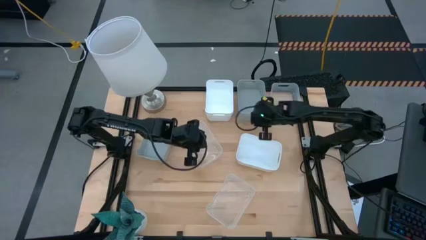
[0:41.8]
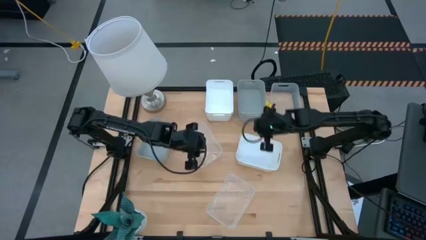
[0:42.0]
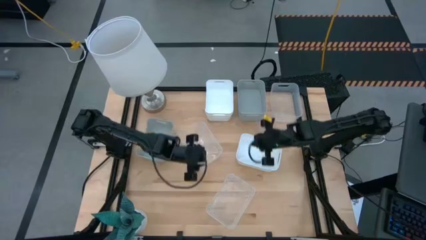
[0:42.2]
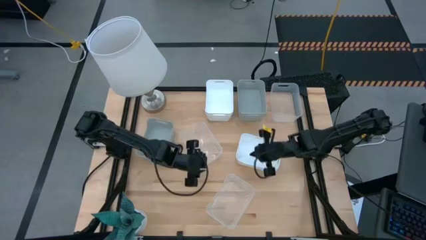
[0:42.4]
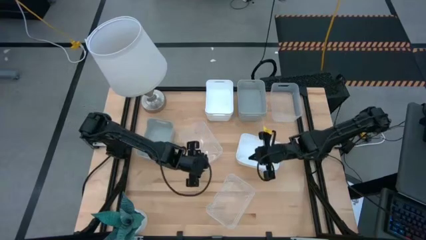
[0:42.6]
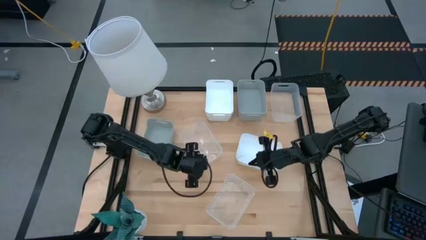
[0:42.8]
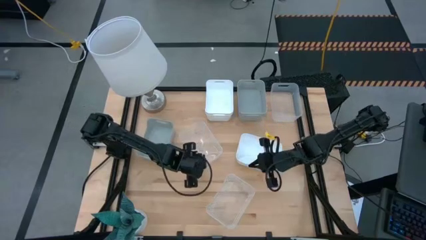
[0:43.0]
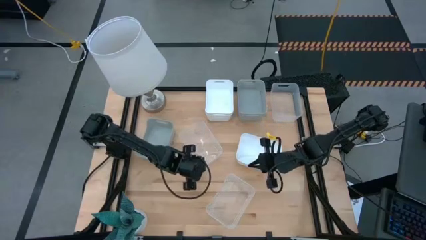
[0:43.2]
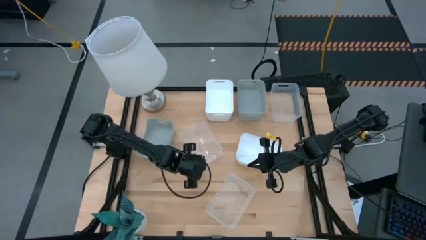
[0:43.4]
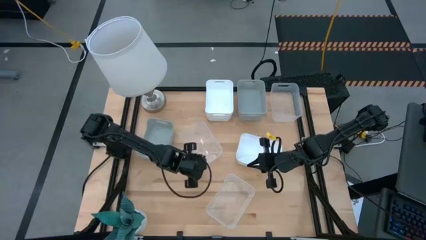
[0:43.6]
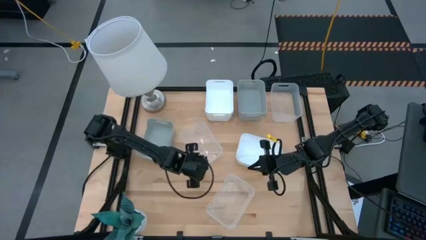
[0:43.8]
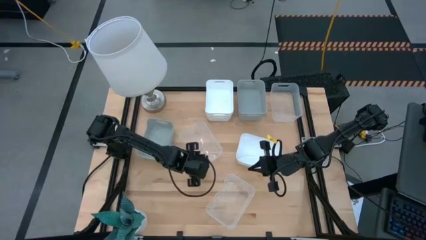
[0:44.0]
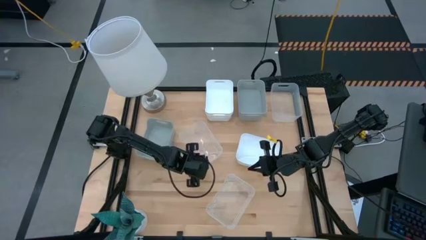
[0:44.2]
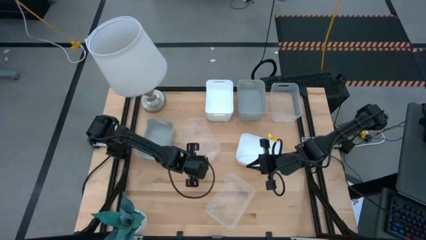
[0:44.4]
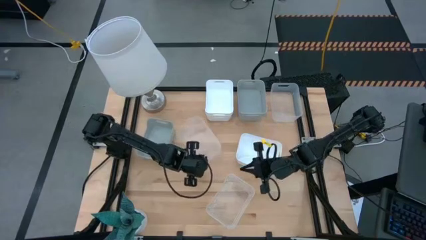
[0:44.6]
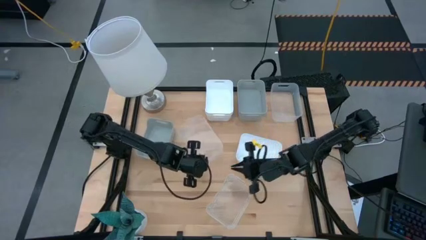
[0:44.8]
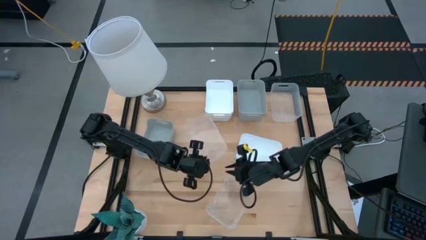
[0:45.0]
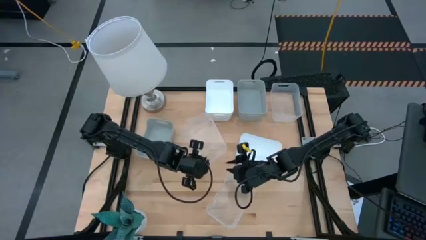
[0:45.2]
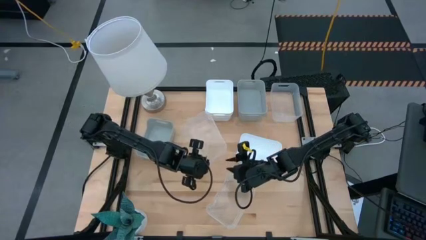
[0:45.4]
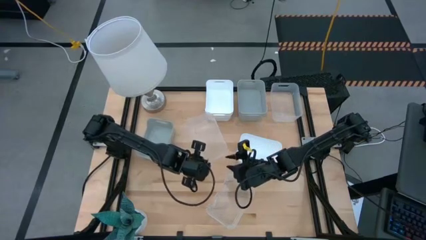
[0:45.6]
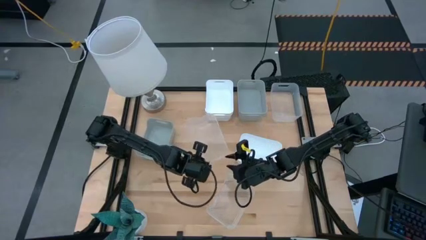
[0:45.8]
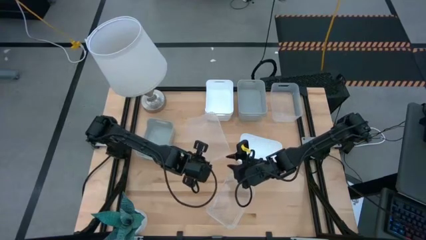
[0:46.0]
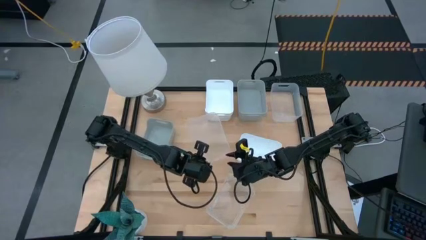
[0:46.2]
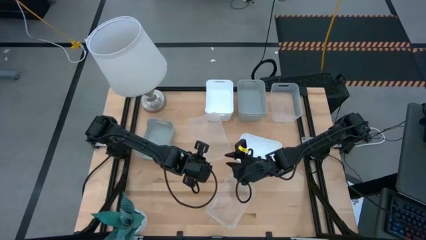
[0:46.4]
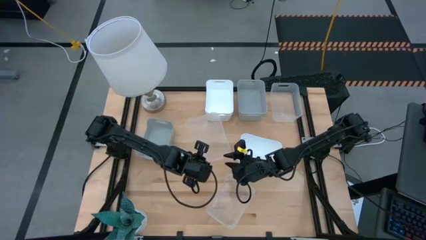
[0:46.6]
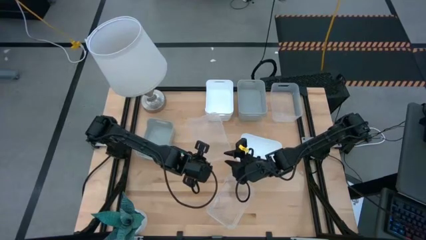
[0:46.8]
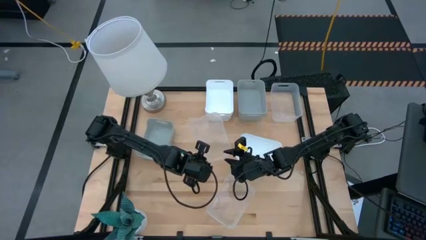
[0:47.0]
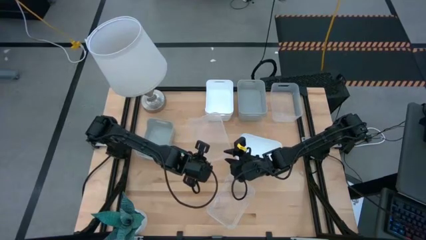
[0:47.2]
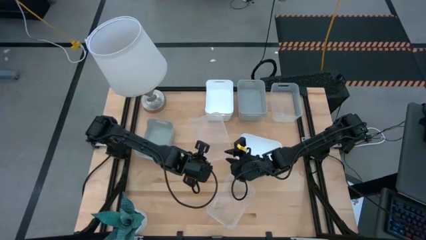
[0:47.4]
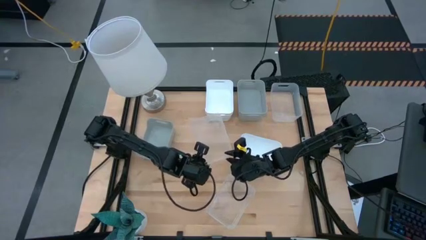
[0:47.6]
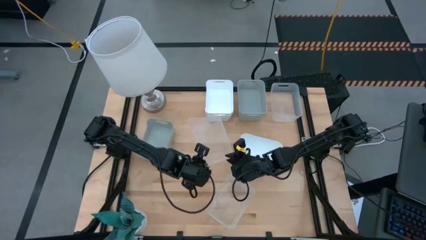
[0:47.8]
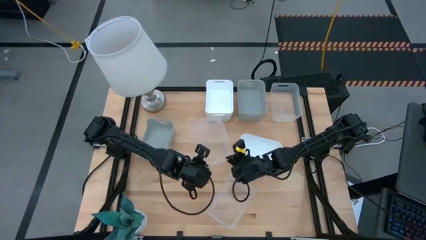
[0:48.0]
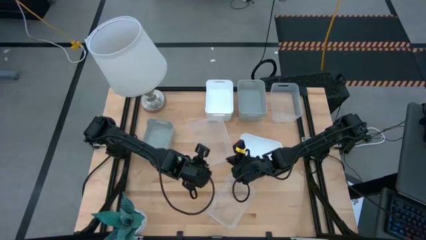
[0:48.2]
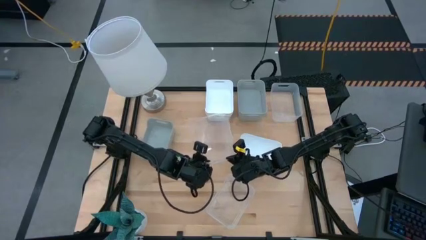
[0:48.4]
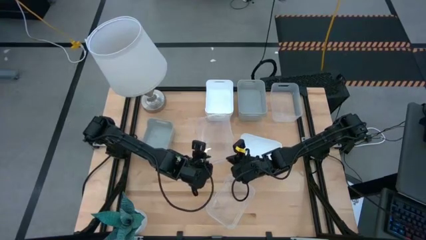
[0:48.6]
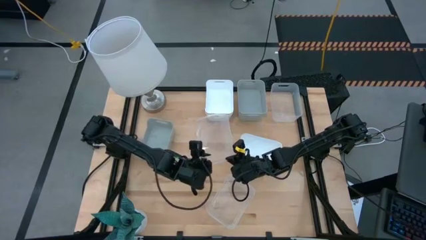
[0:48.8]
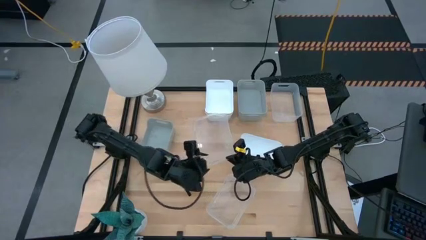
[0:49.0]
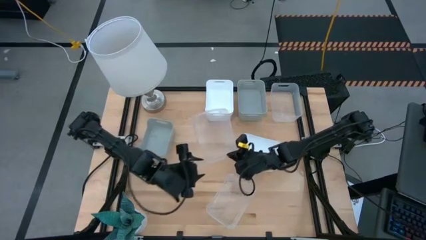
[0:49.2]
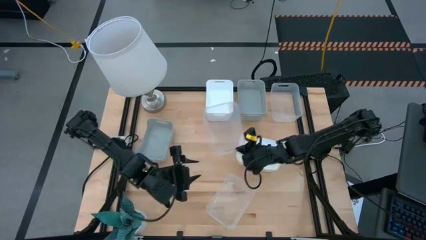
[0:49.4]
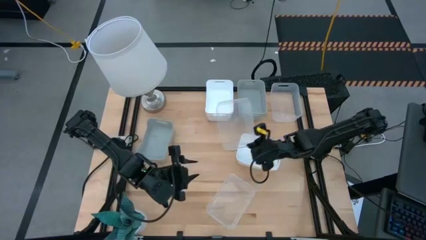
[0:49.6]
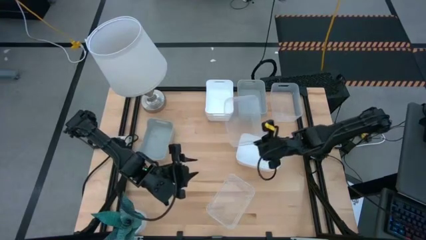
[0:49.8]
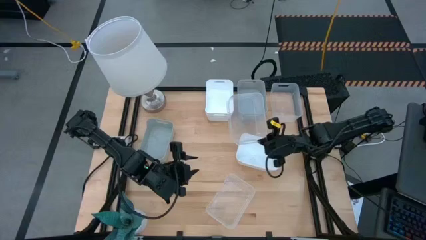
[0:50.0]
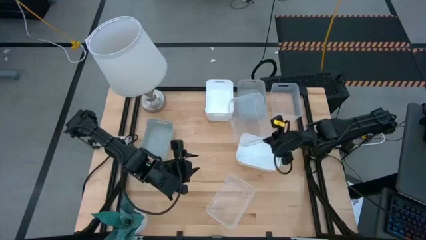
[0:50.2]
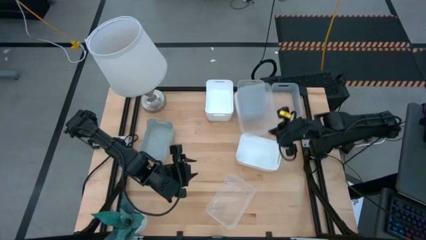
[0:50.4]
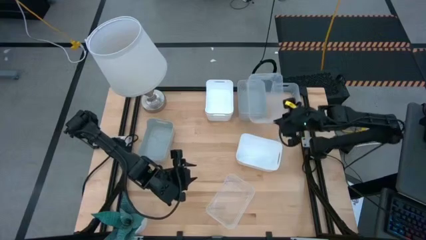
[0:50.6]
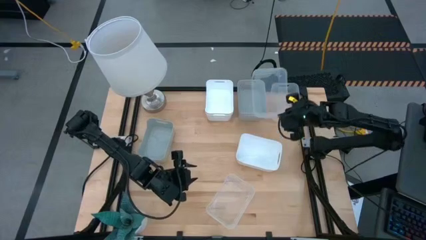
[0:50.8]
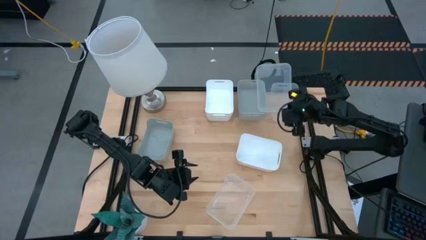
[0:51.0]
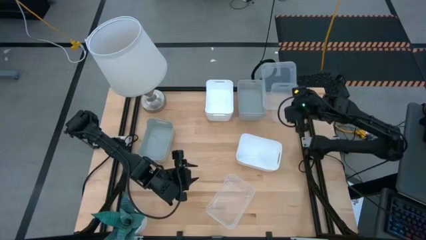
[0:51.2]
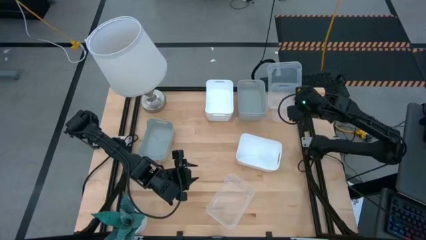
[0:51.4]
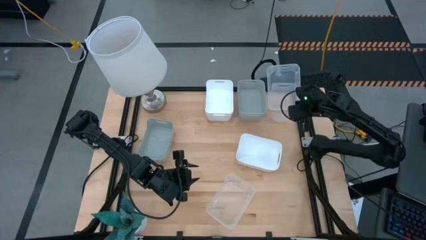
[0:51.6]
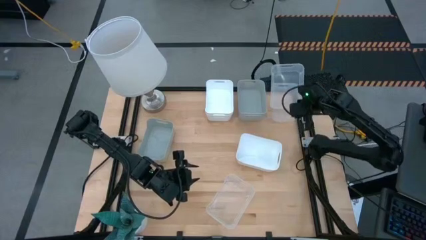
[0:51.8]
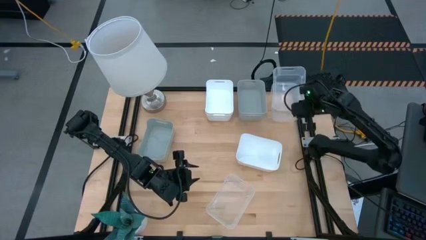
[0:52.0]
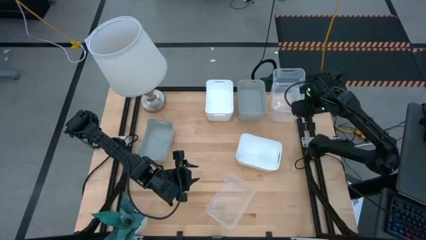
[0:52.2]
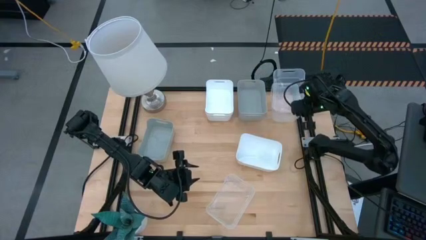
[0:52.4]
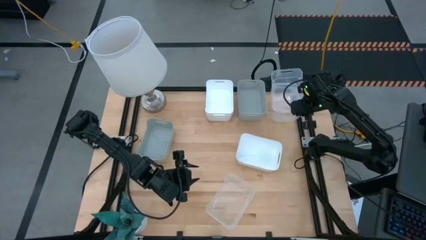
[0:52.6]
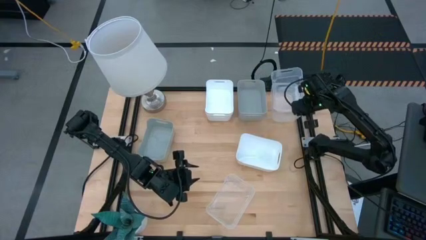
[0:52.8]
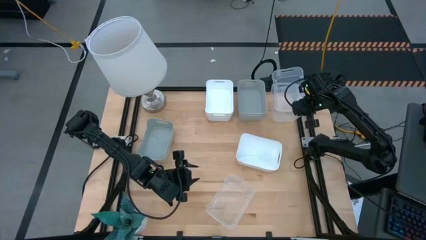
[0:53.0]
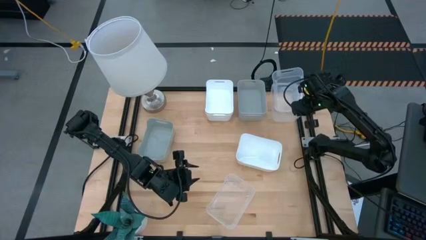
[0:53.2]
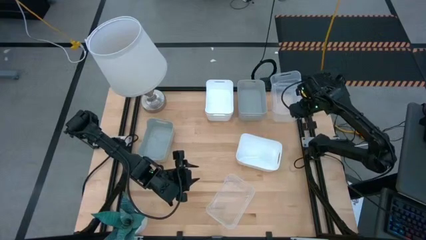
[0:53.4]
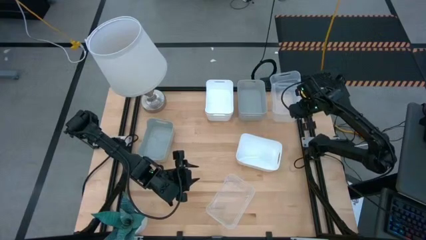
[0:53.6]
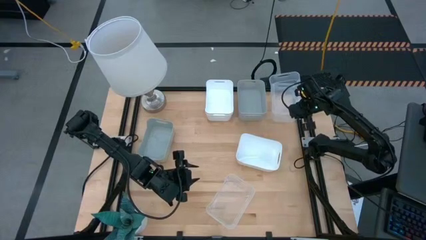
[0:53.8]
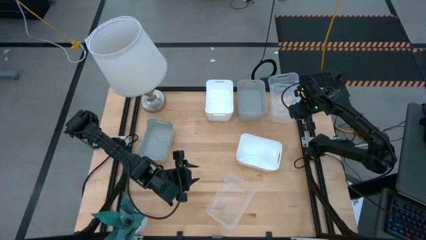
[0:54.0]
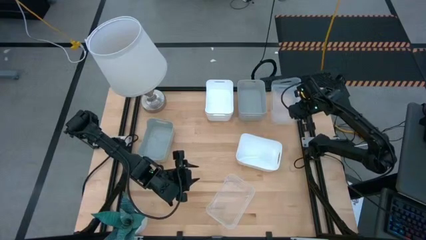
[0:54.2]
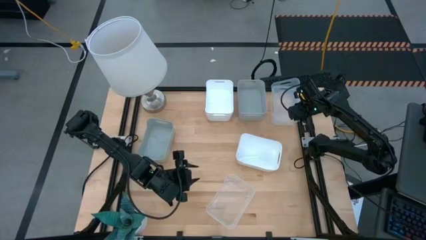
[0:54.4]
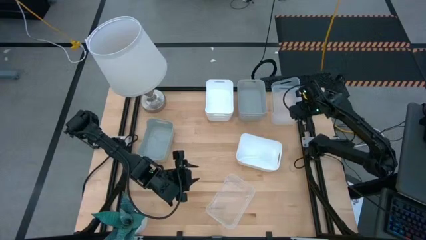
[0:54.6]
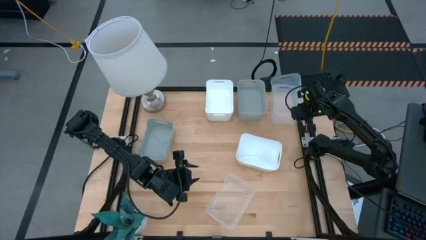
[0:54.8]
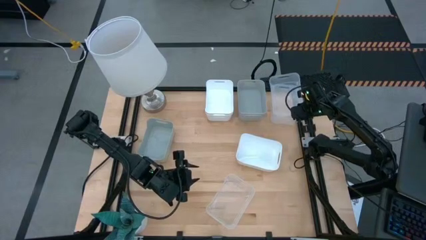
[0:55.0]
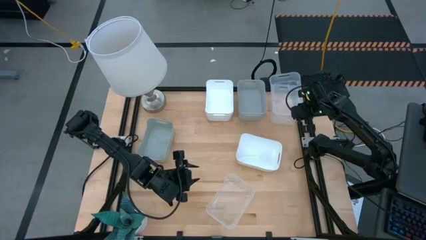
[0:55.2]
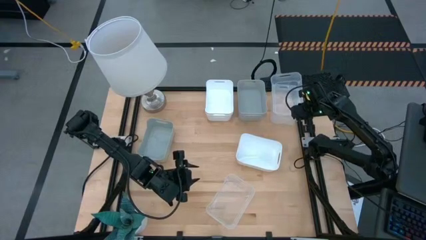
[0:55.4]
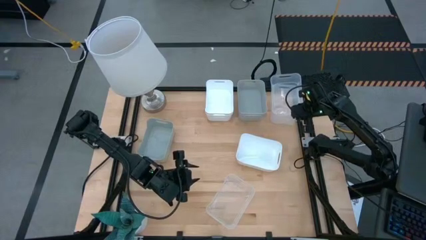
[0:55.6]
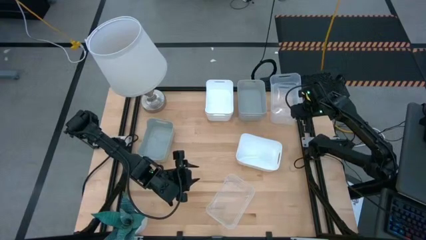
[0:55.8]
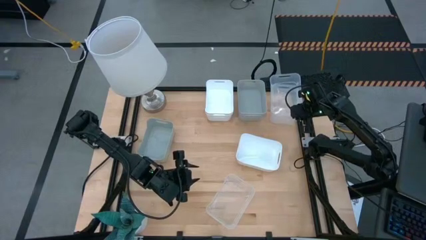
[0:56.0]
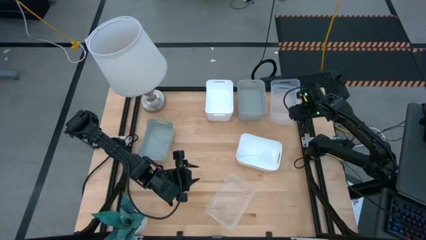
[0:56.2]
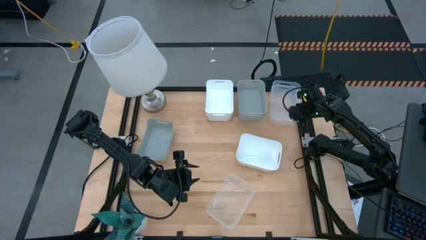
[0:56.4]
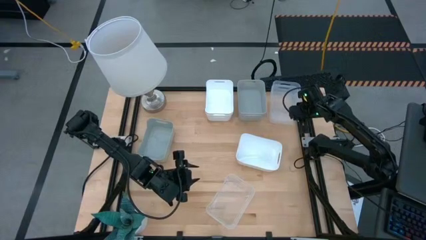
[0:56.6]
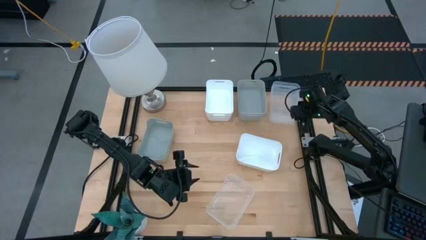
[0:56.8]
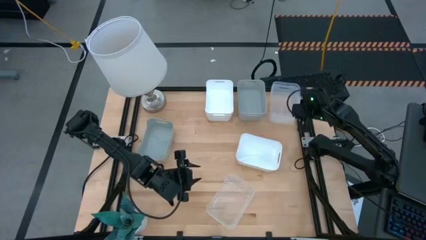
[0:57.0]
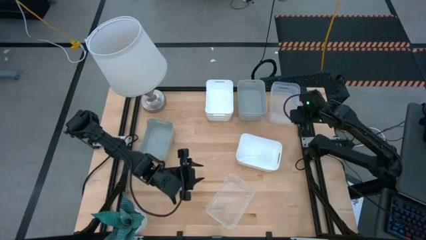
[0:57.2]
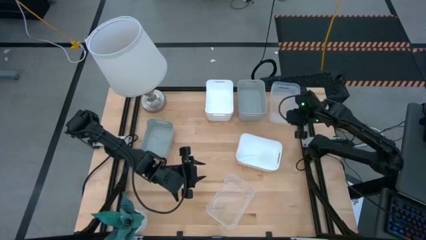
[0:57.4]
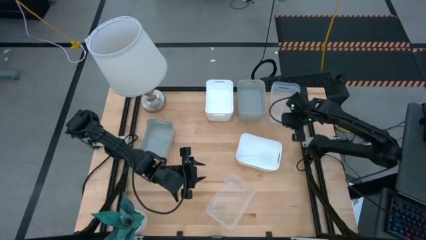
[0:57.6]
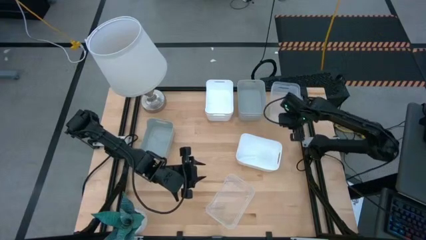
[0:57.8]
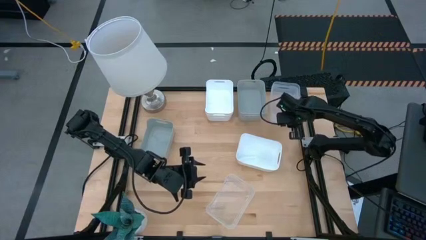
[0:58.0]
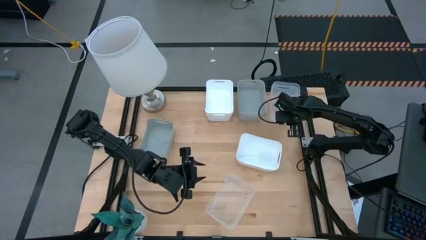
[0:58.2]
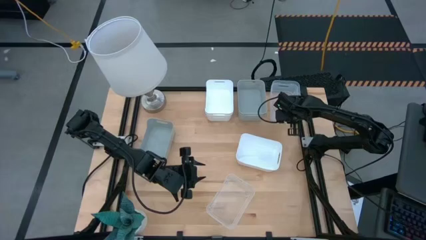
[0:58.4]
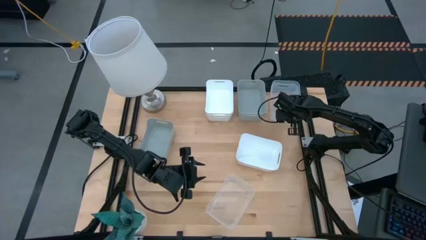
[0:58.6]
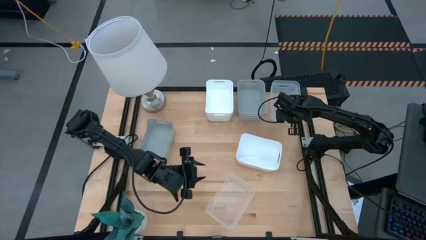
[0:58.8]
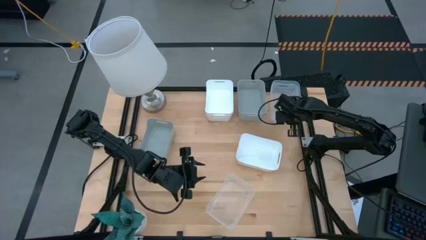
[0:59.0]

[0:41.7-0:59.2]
Stack the middle transparent bin on top of the top transparent bin
